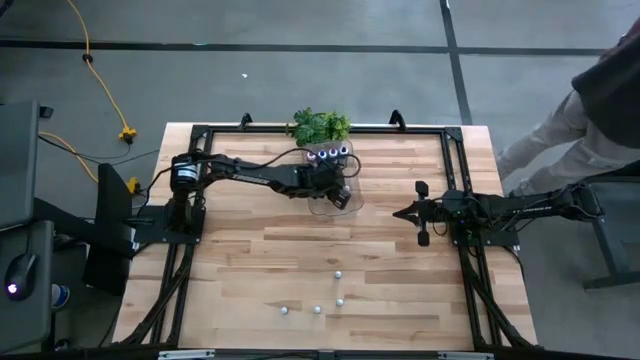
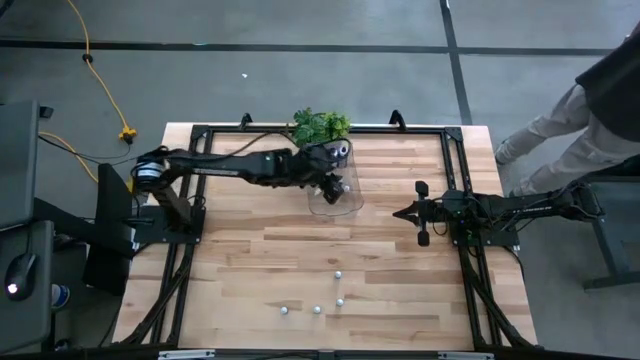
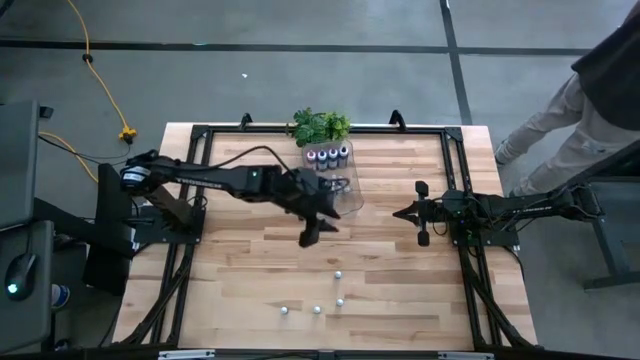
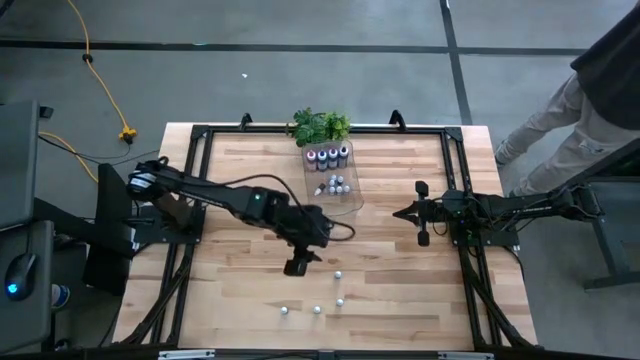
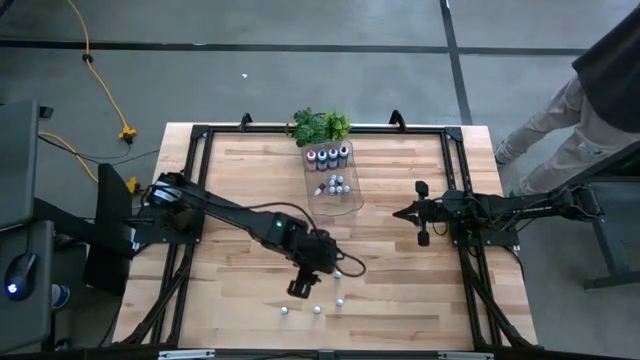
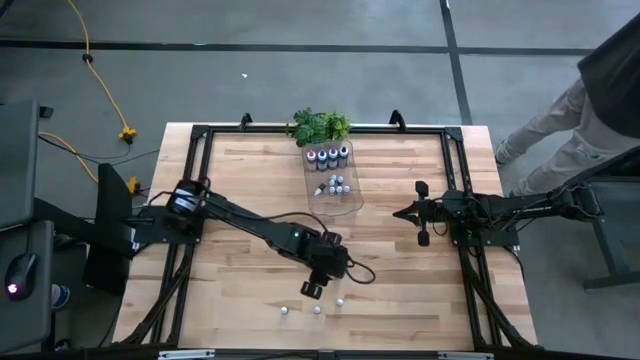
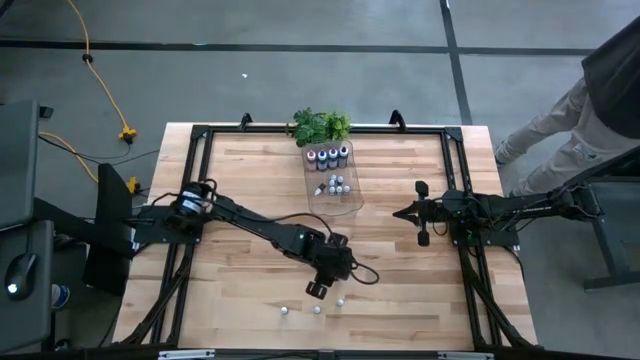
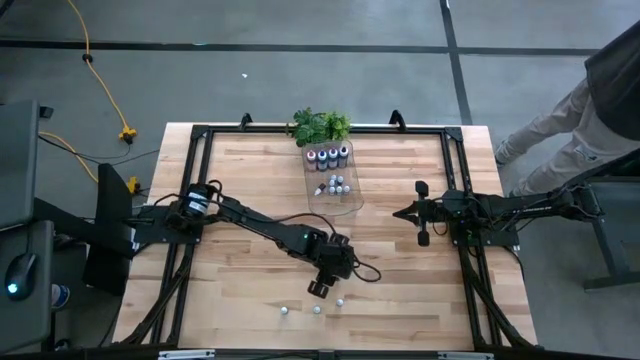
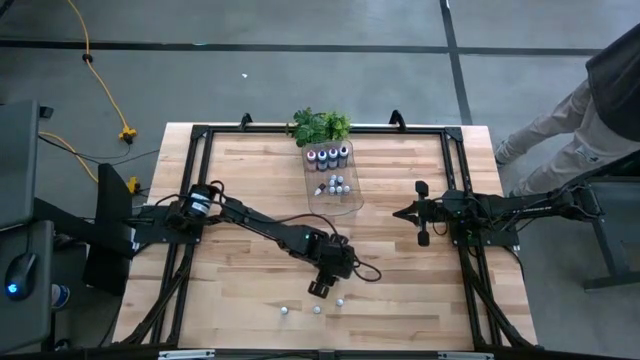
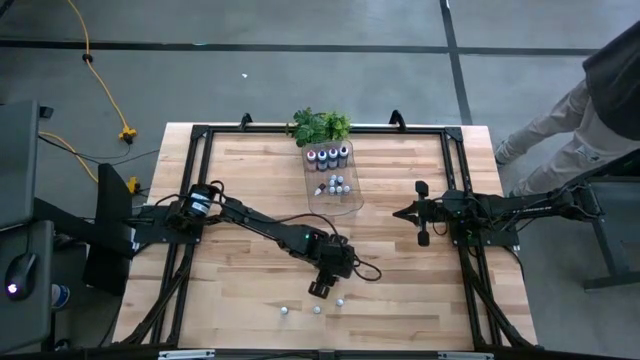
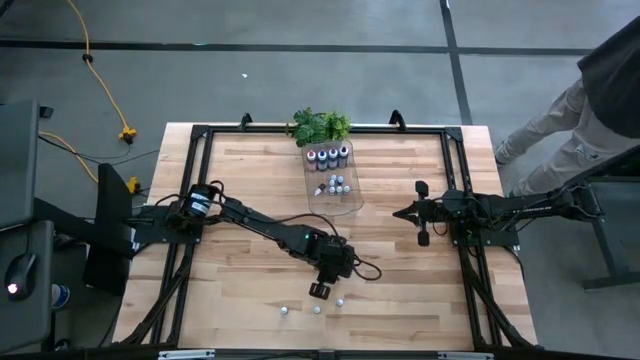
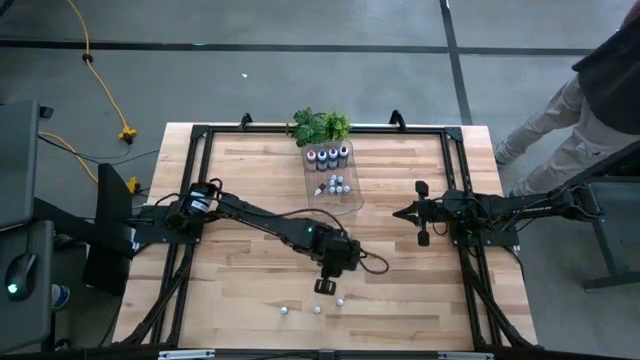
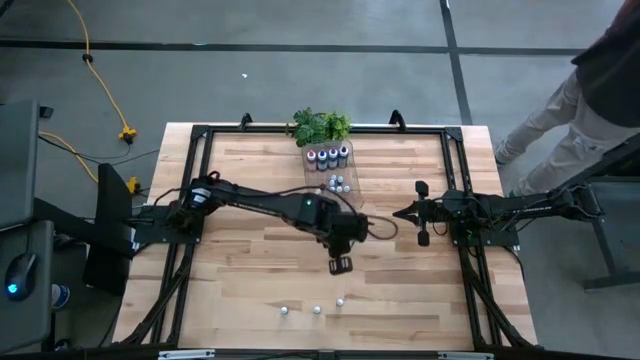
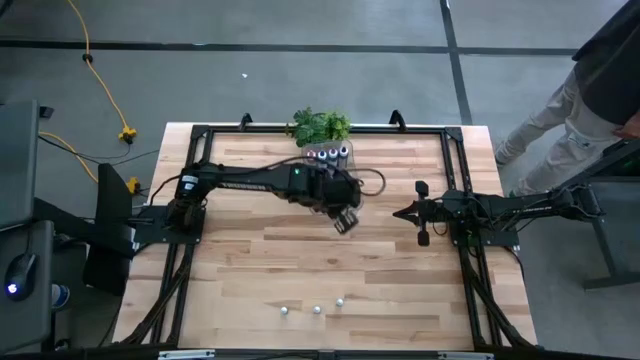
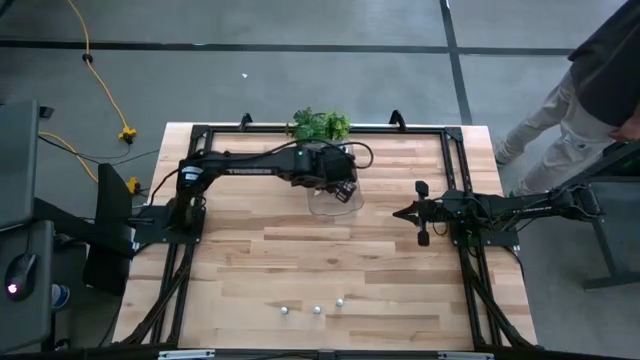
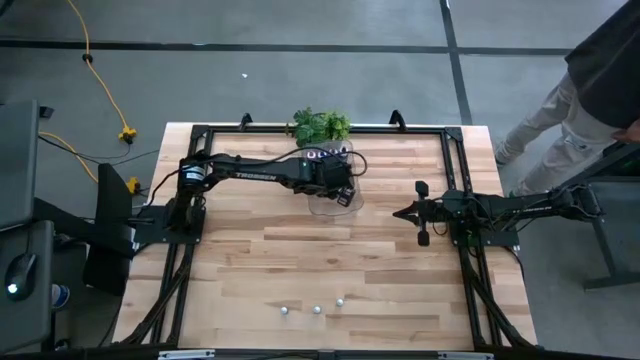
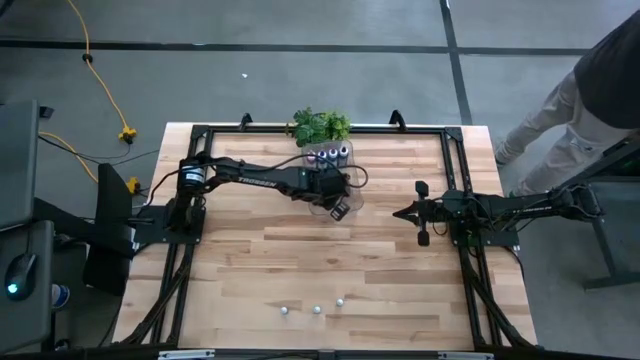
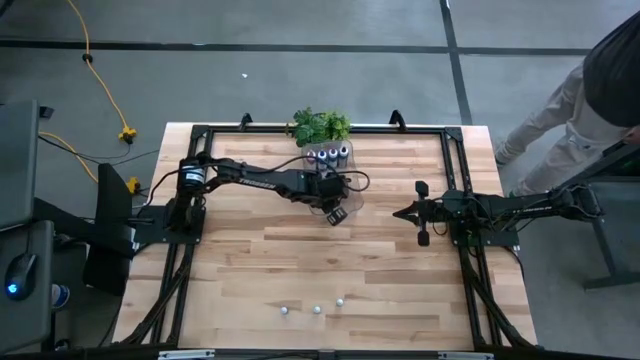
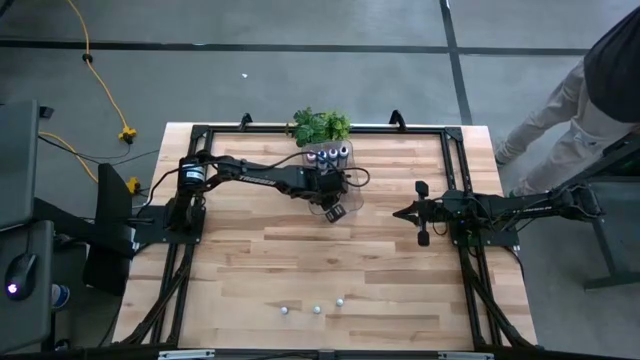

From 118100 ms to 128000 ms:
Task: Pick & Place food coloring
Put the small green food coloring bottle into the transparent bin

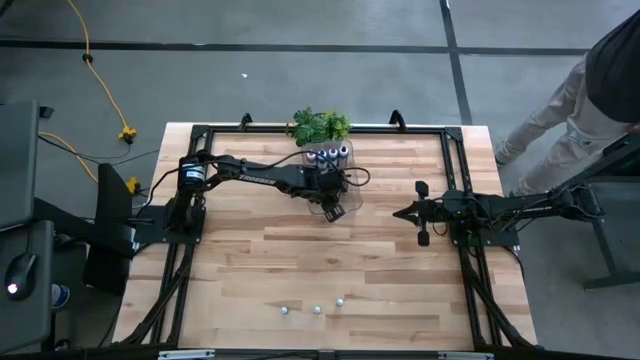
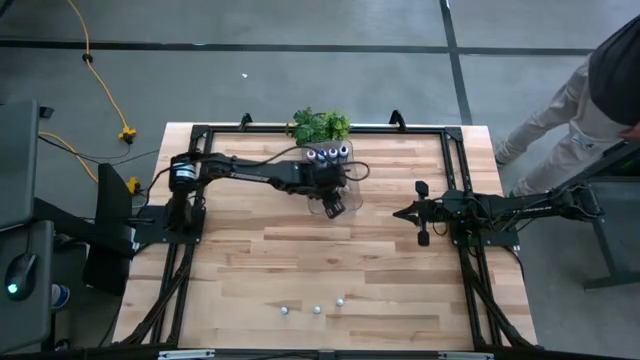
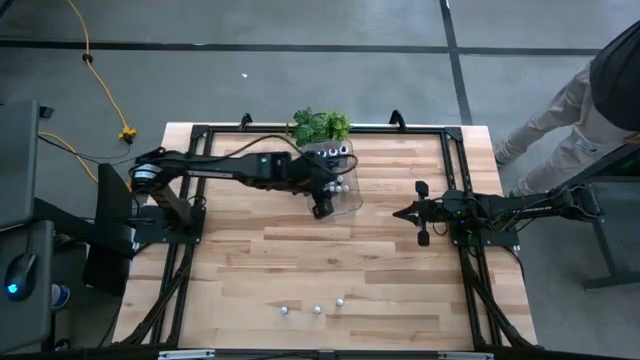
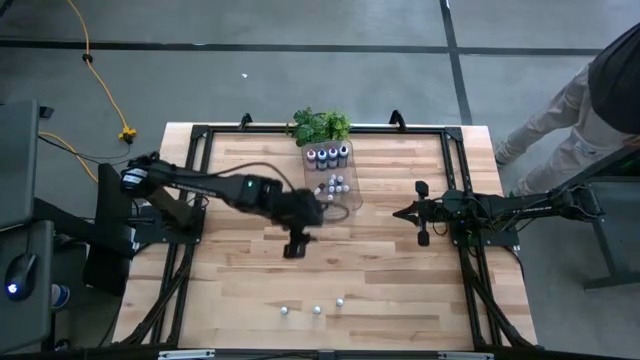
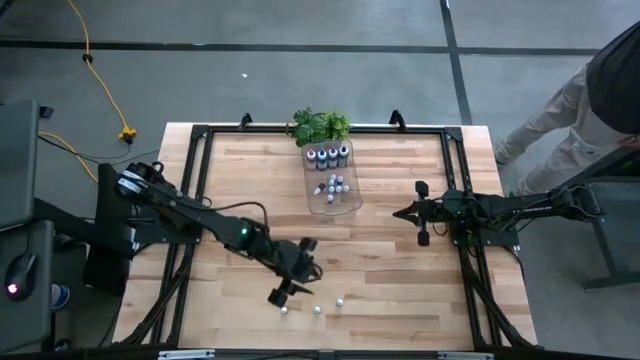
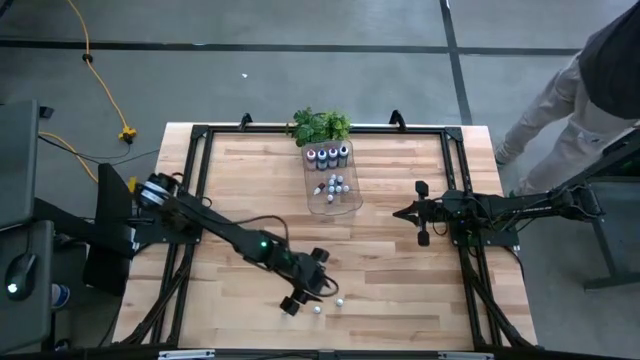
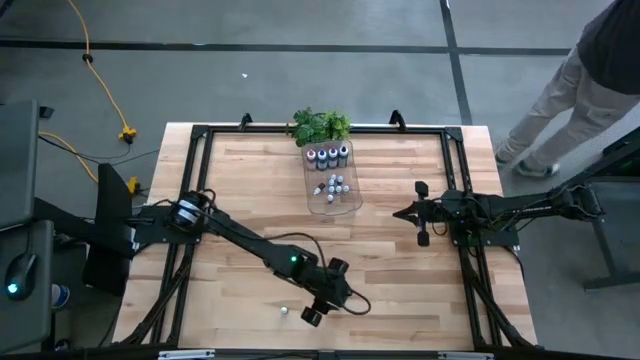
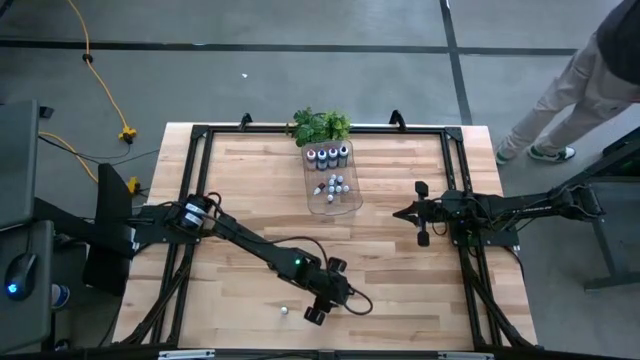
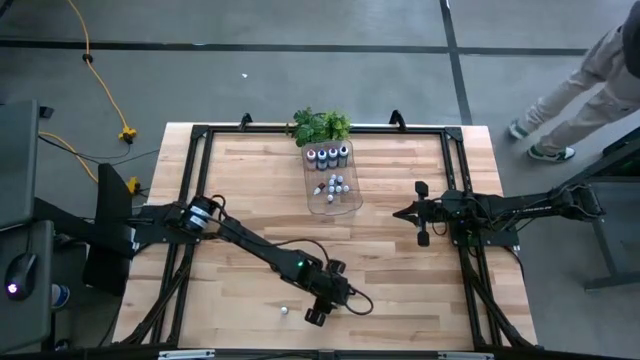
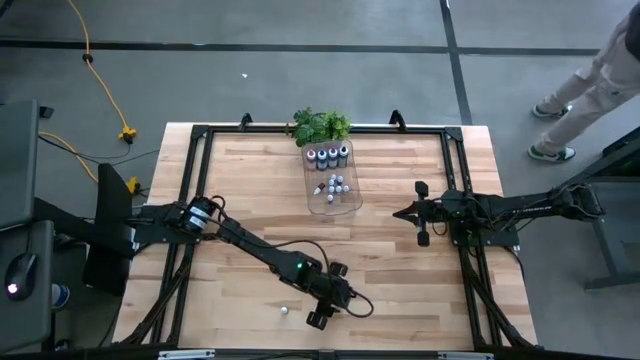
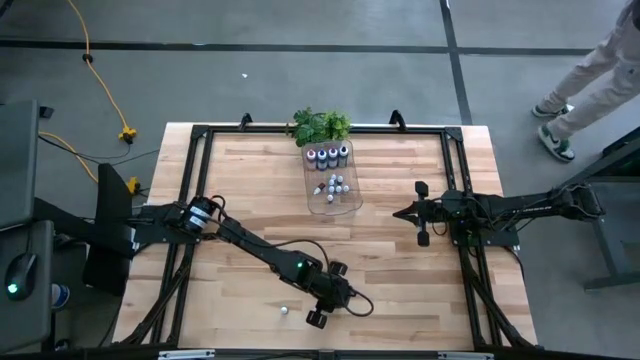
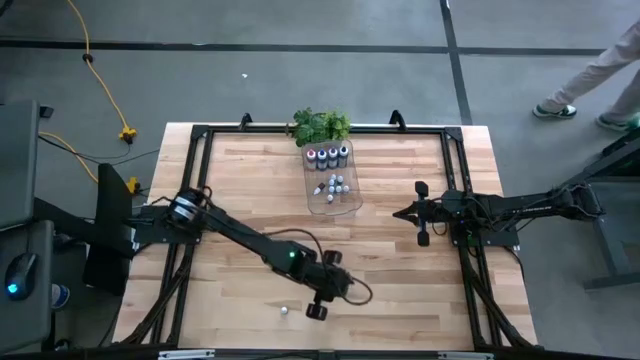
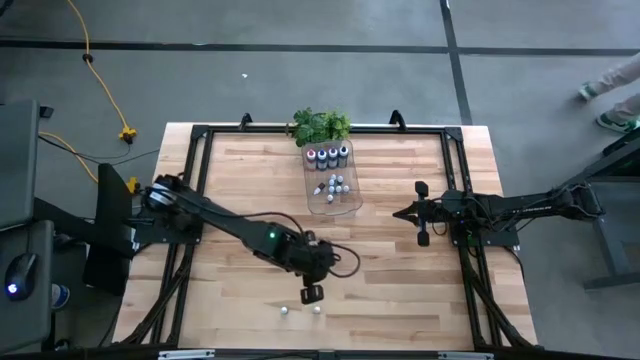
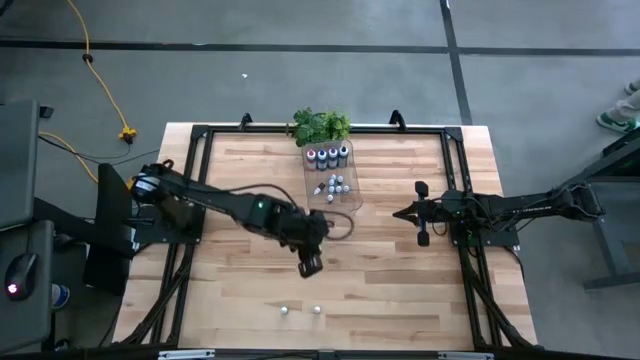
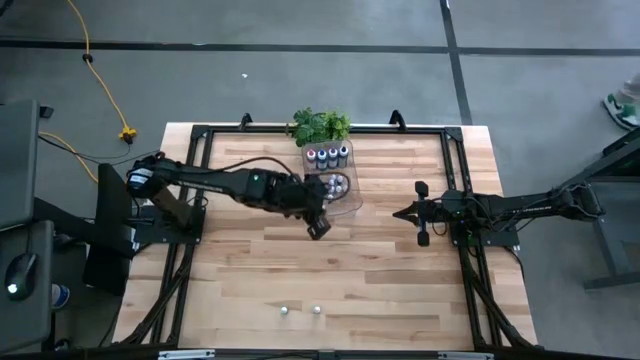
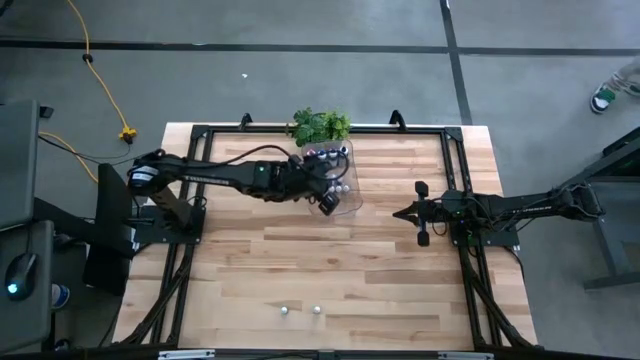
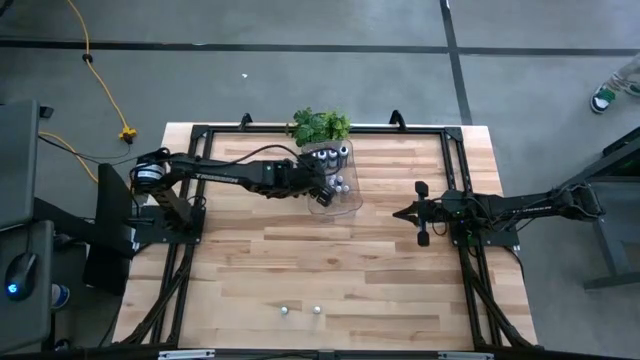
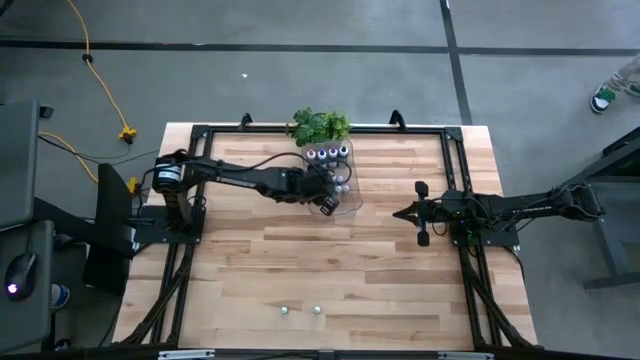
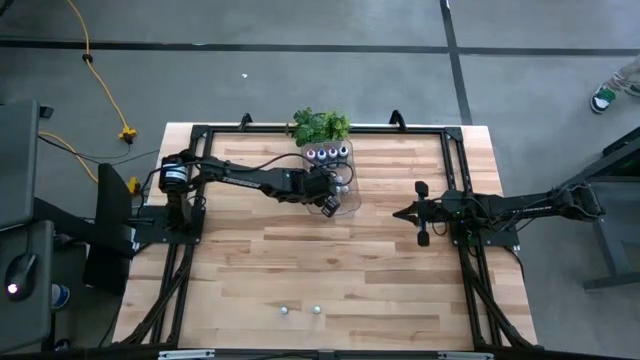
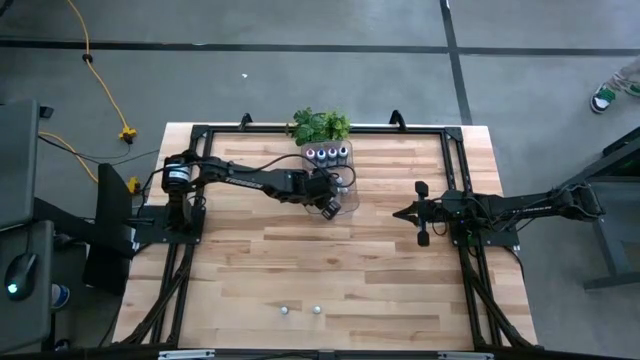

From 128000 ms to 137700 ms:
Put the small violet food coloring bottle into the transparent bin

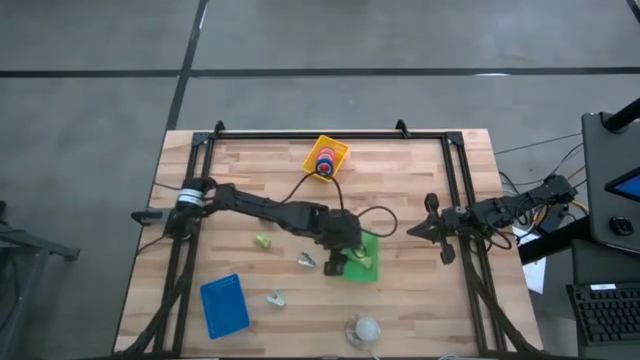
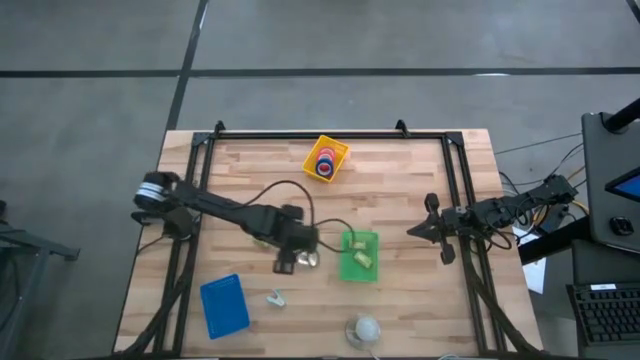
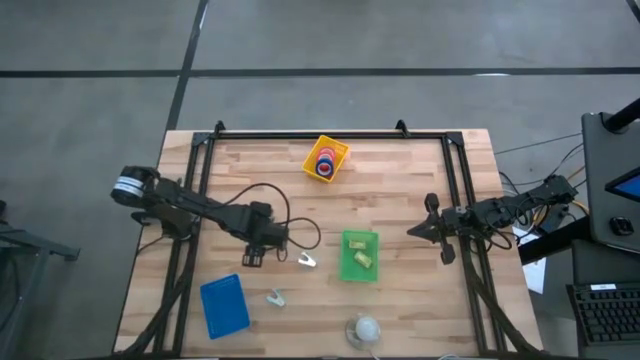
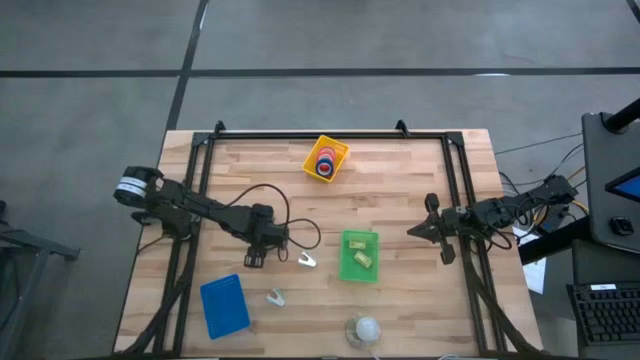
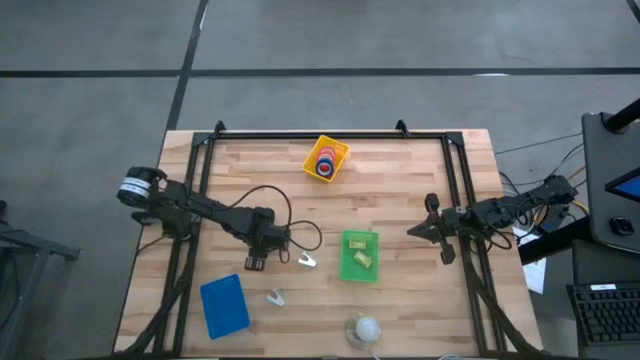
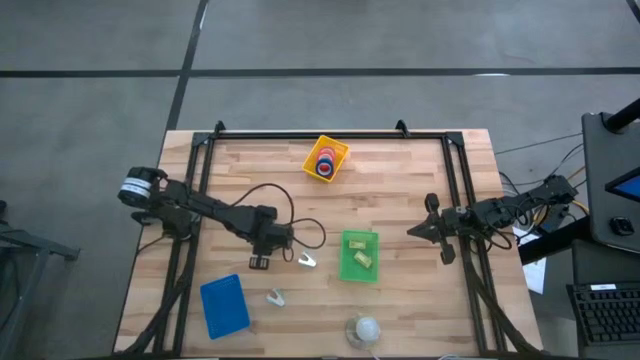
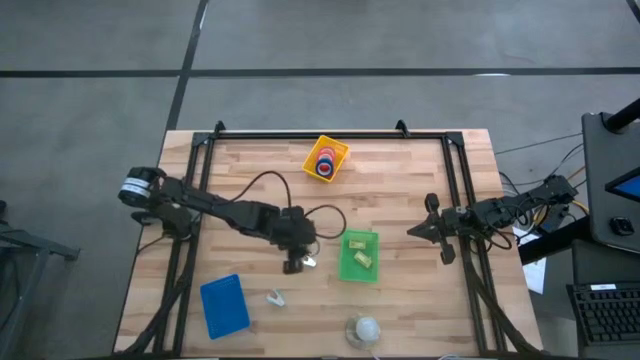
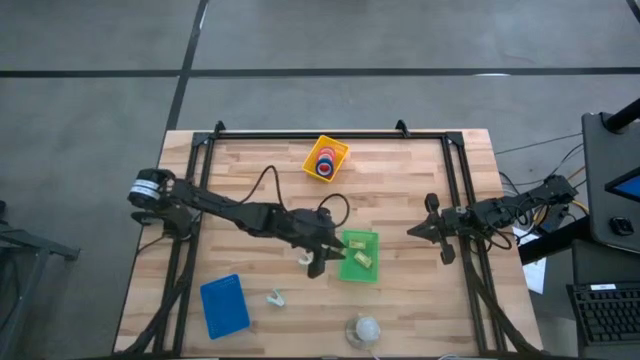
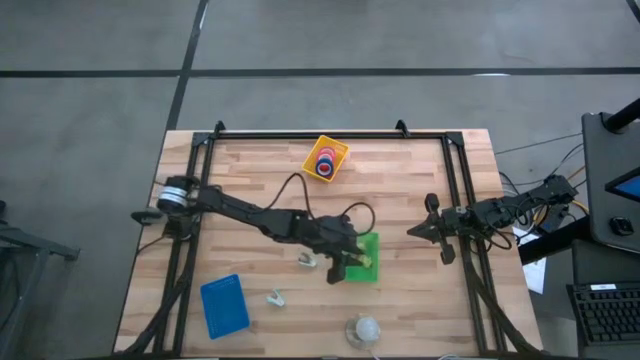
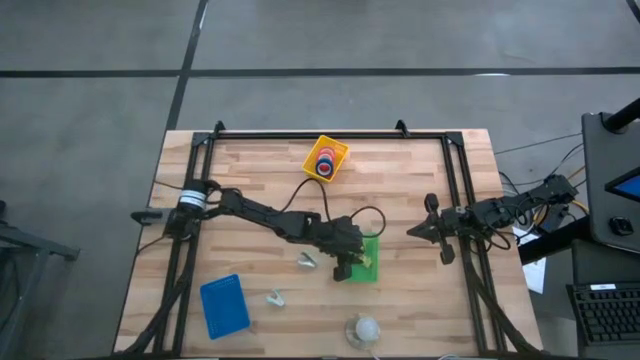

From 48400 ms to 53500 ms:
Task: Pick and place Stapler, Stapler remover, tape
Put the green staple box into the green bin
